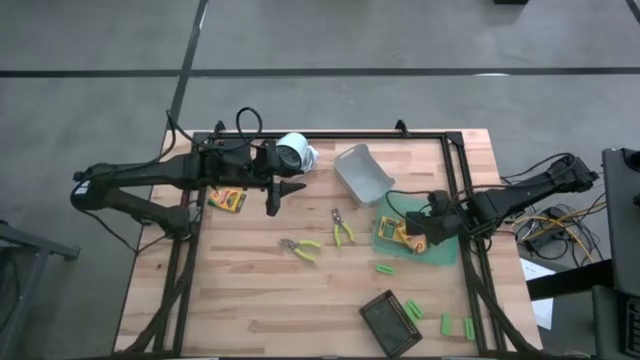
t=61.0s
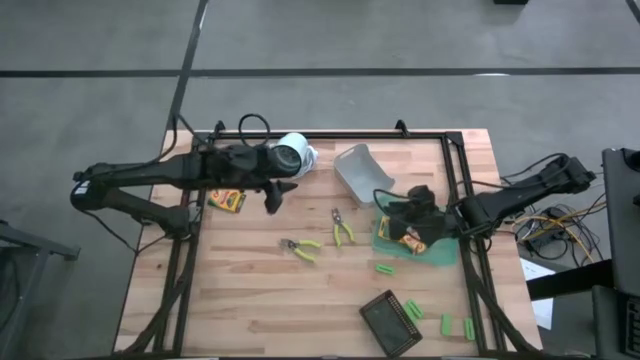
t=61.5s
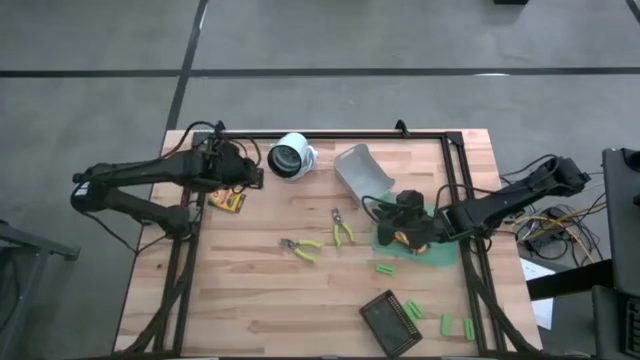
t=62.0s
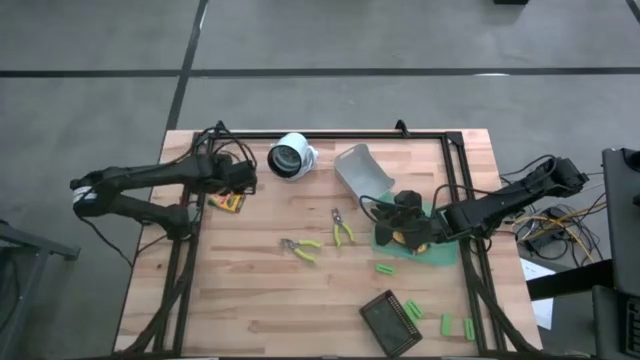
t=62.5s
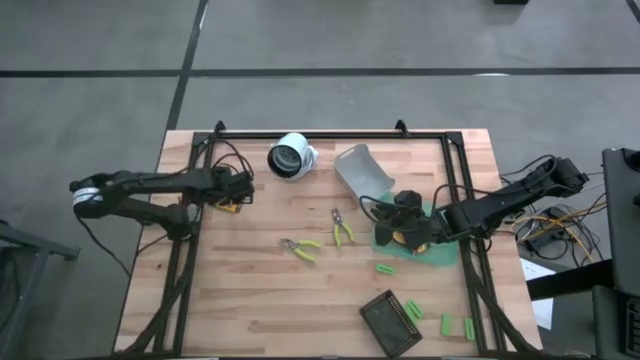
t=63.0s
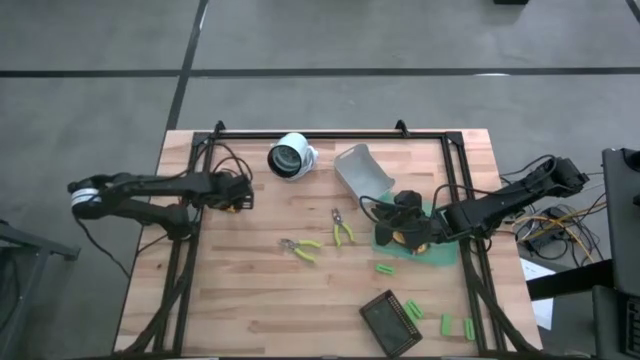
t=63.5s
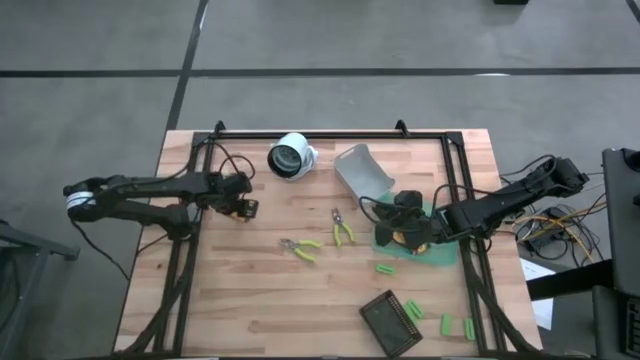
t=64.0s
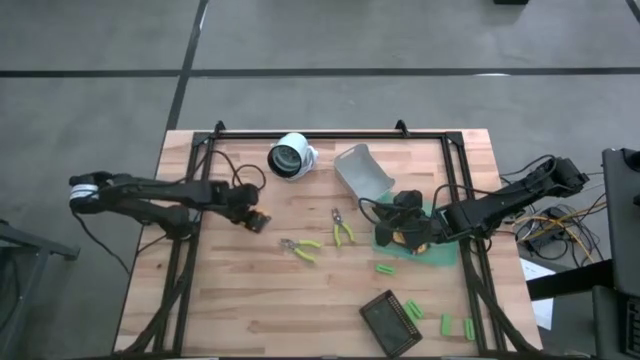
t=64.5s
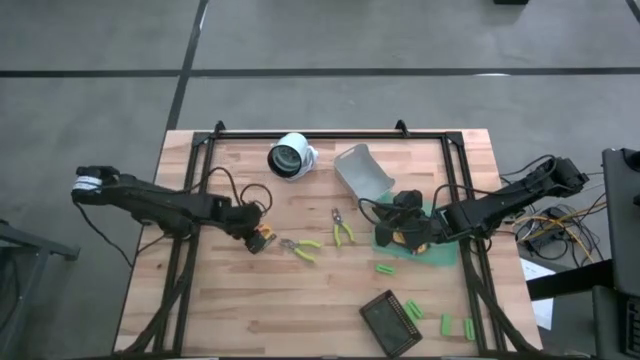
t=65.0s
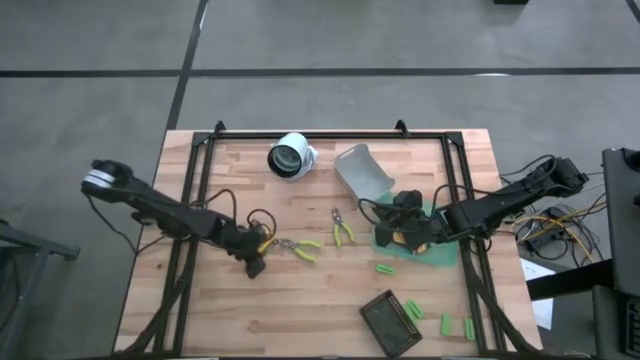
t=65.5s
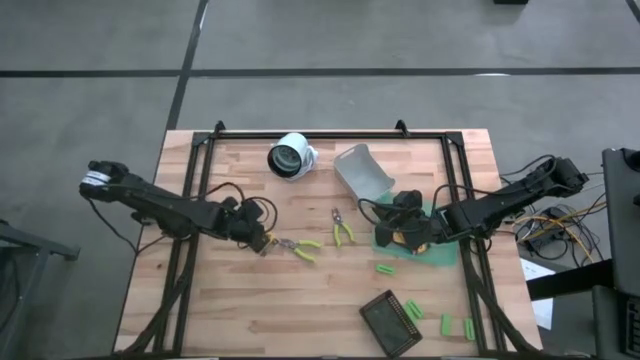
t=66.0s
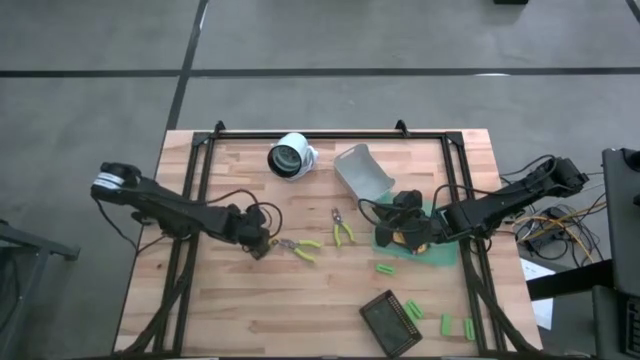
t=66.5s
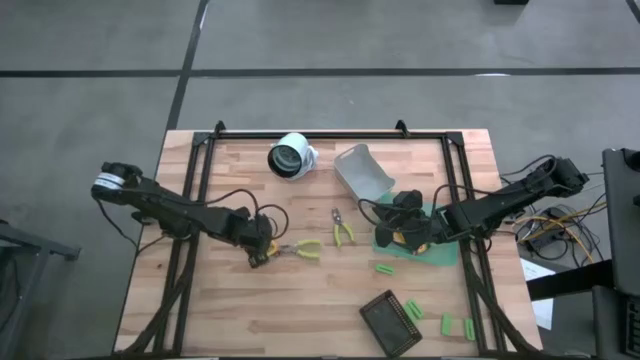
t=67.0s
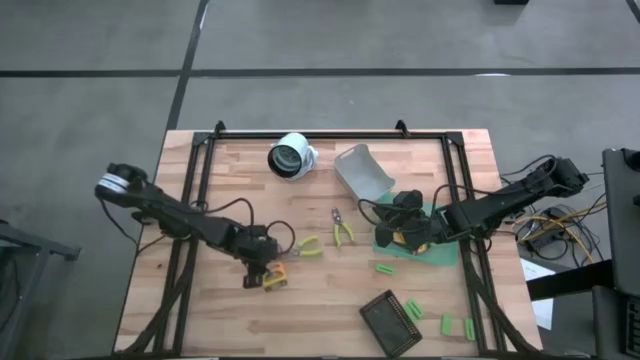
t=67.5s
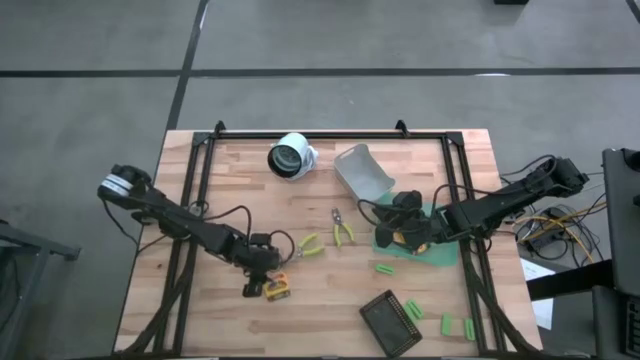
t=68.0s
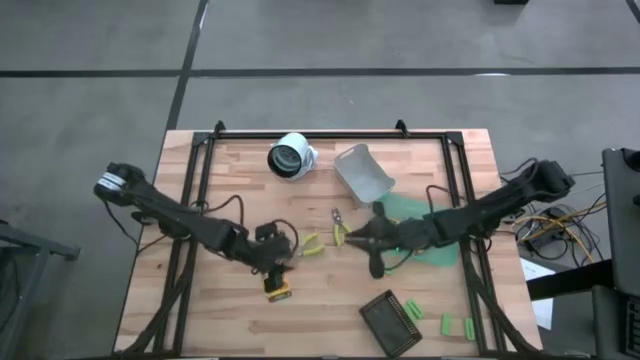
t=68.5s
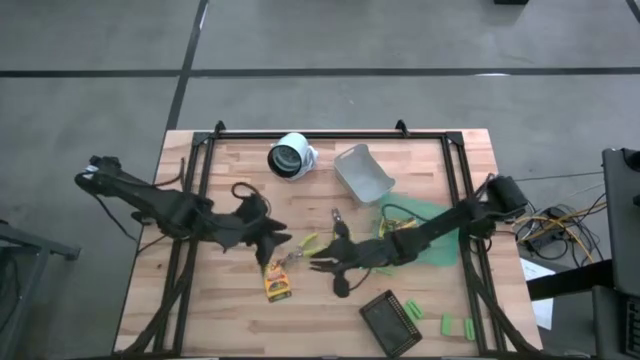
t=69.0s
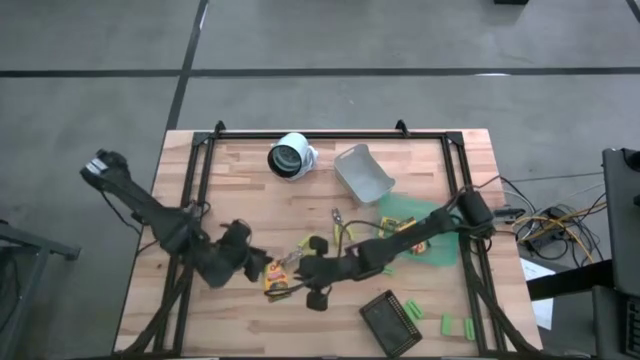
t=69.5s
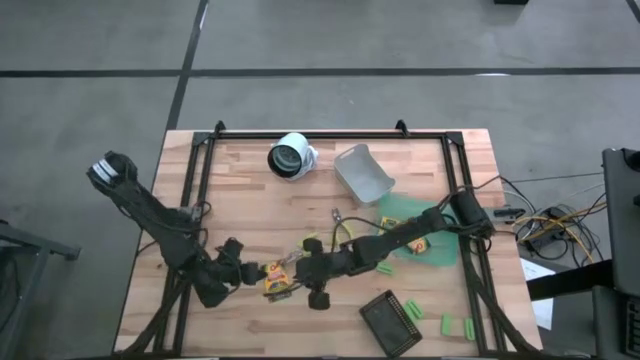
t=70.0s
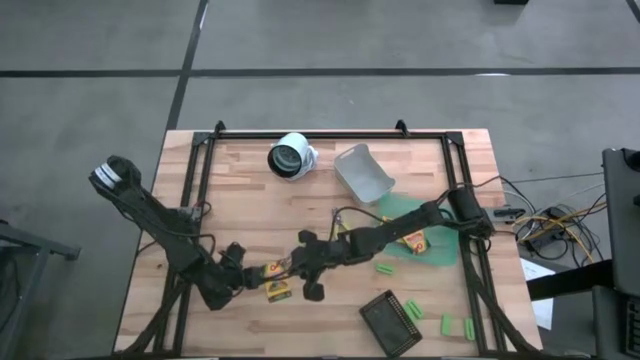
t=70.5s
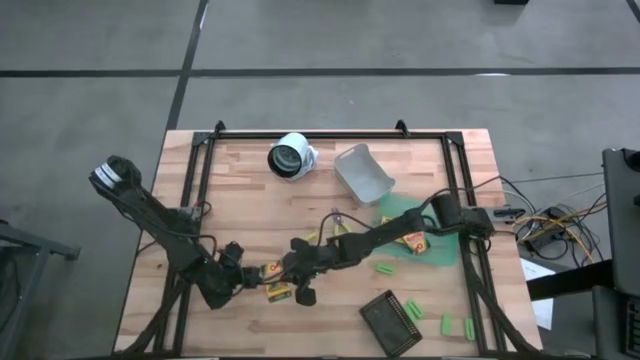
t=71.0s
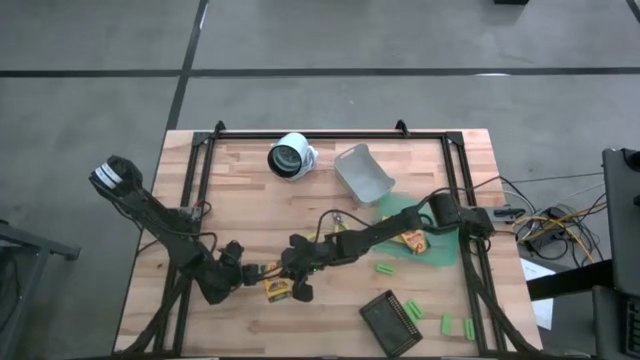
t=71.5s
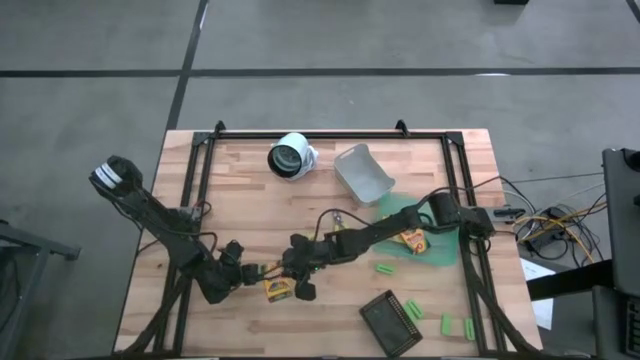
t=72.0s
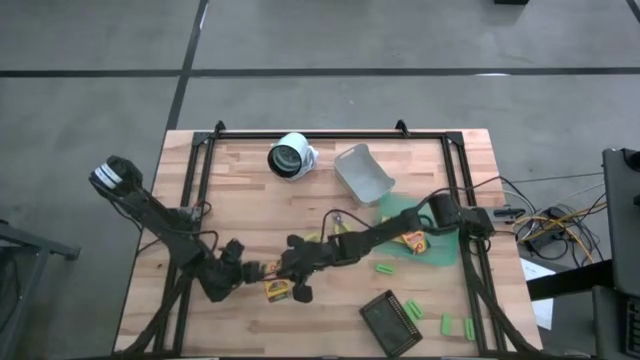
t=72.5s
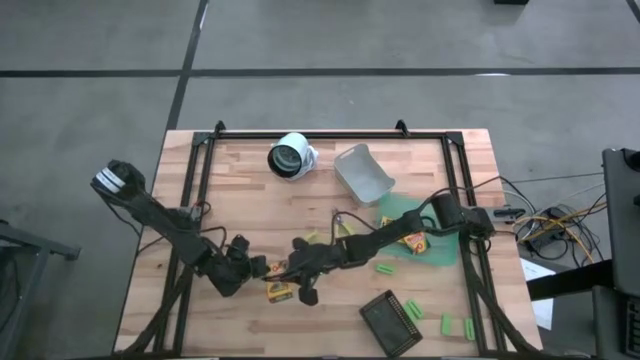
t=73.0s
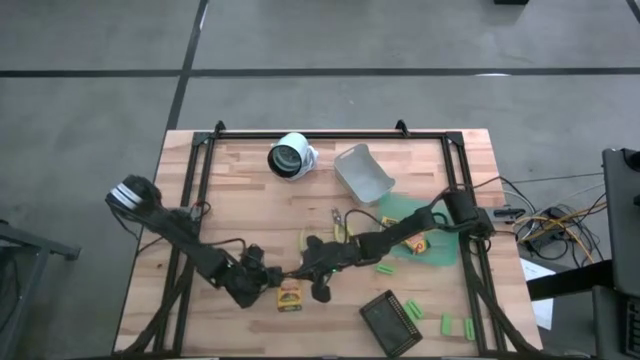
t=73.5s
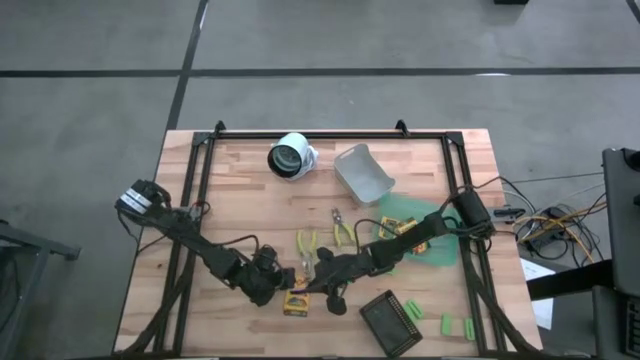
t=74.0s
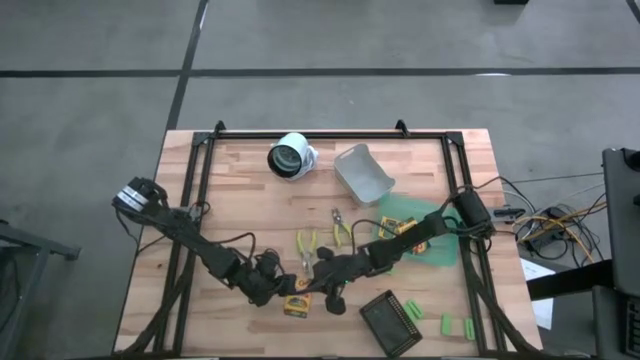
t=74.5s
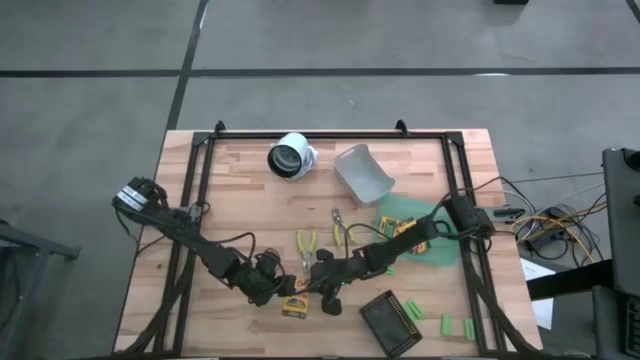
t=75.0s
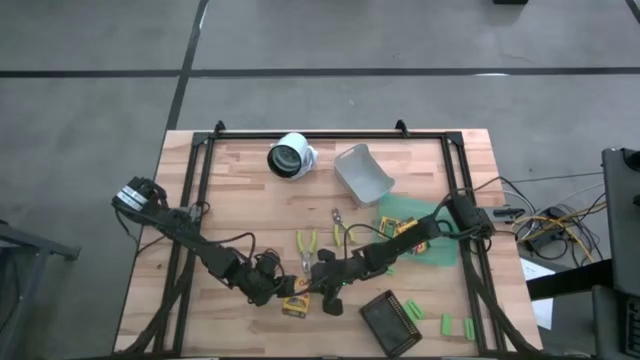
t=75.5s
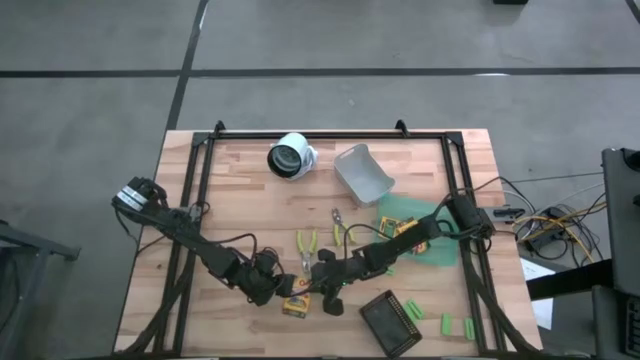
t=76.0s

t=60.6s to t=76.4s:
Task: Pick & Place School Supplies
Put the yellow crayon box into the green bin

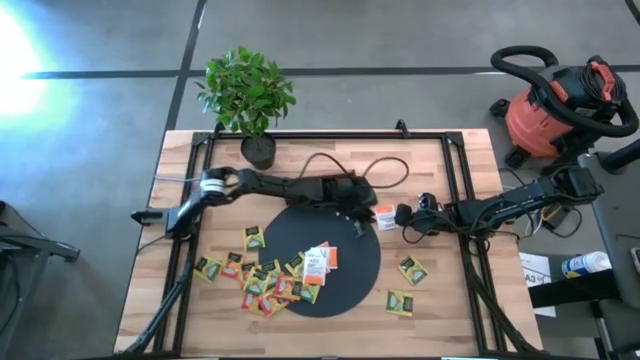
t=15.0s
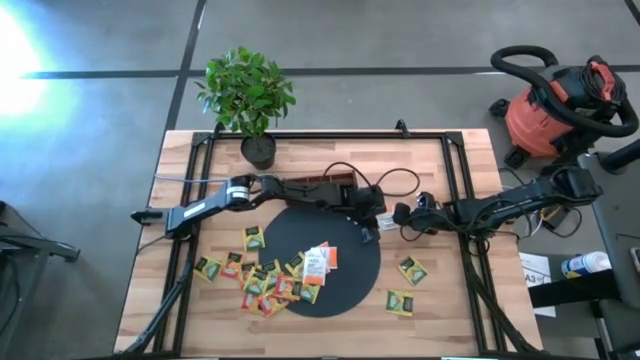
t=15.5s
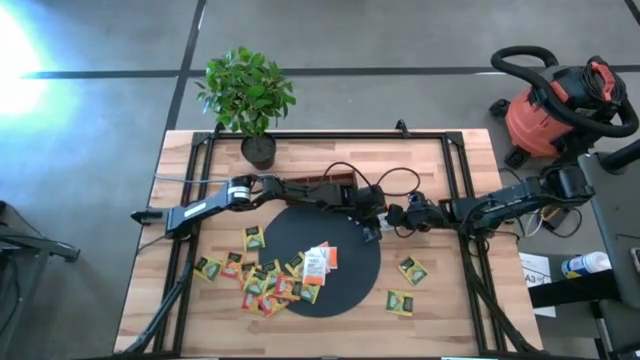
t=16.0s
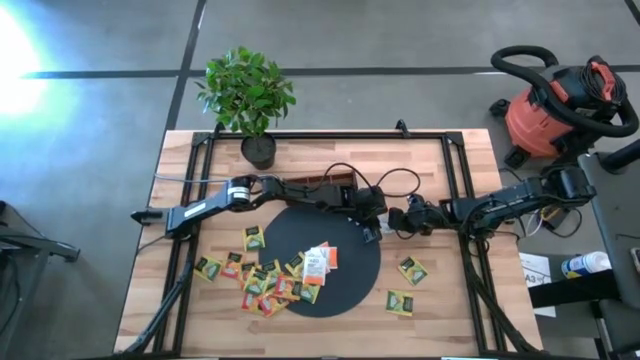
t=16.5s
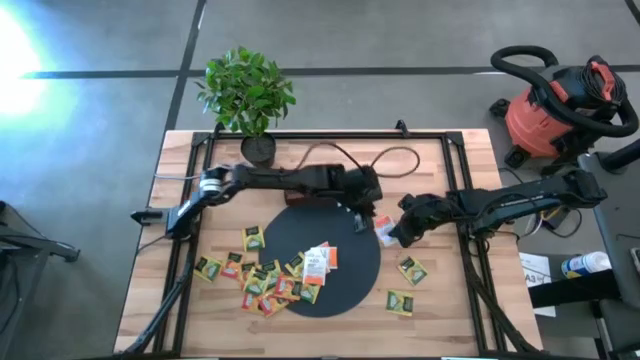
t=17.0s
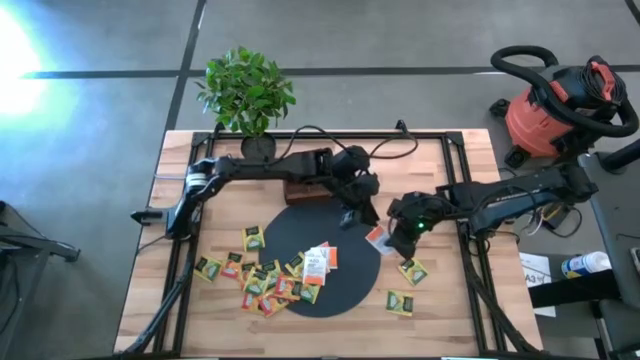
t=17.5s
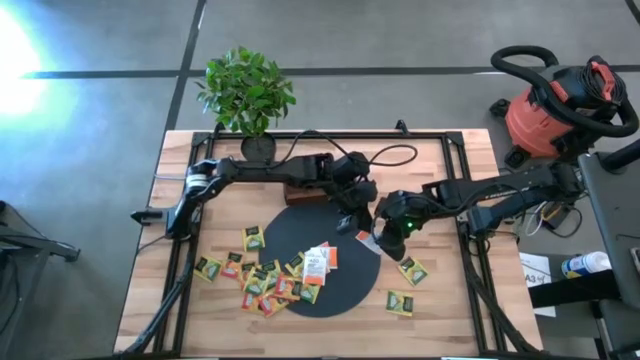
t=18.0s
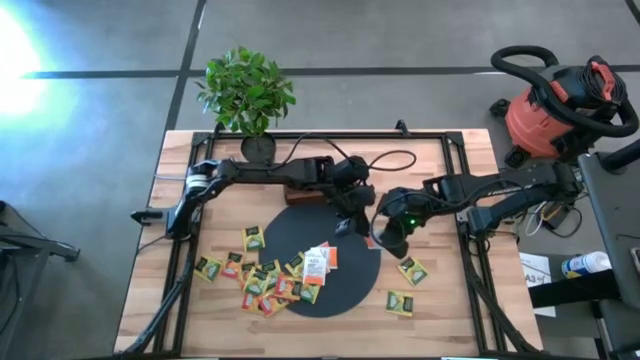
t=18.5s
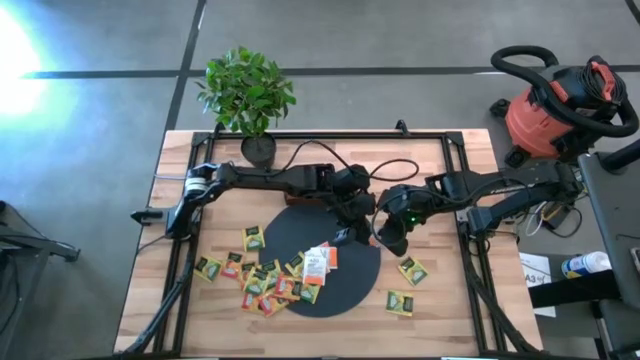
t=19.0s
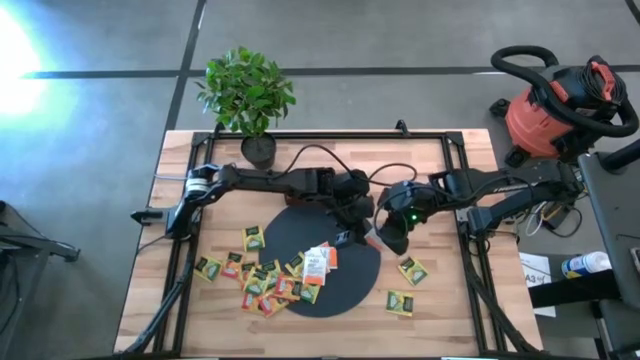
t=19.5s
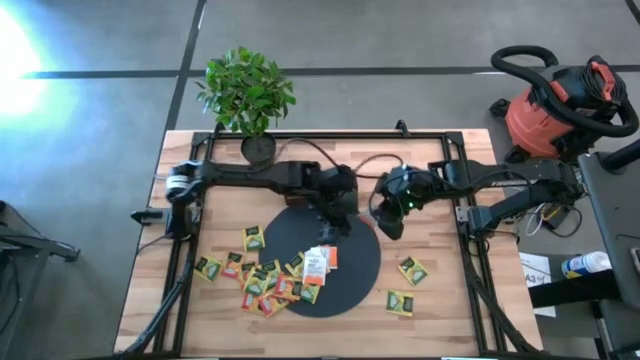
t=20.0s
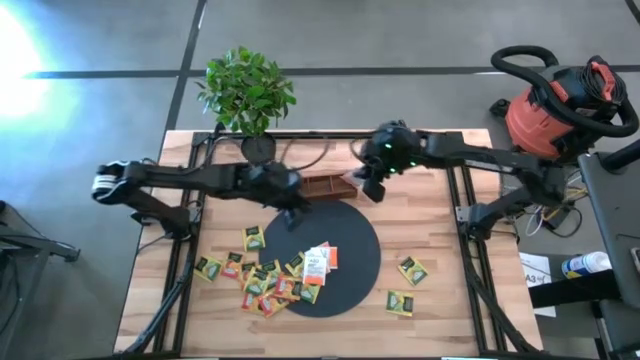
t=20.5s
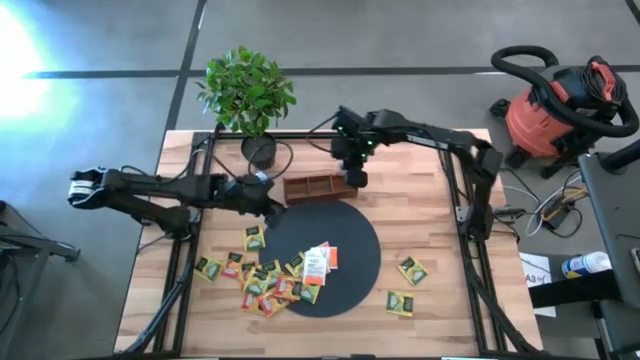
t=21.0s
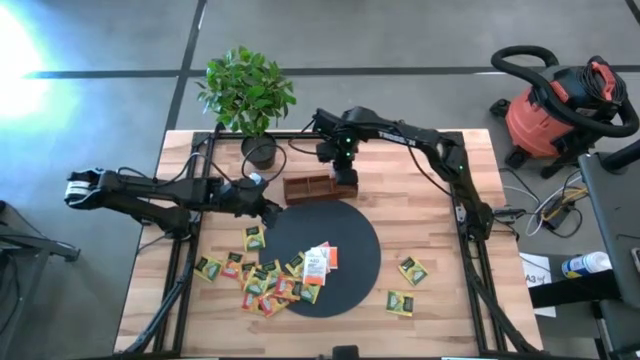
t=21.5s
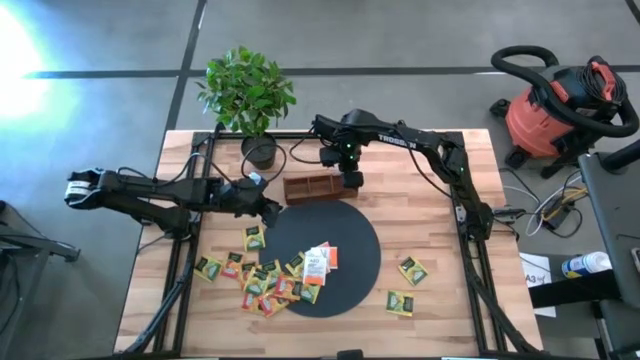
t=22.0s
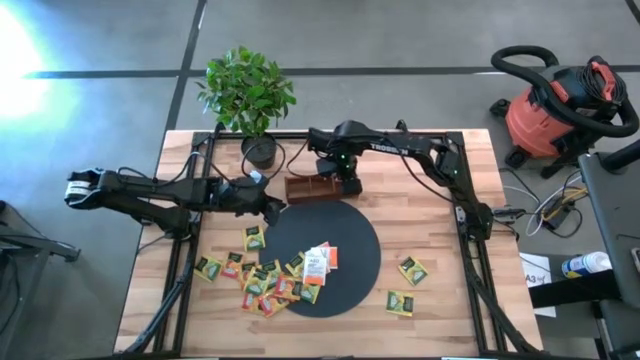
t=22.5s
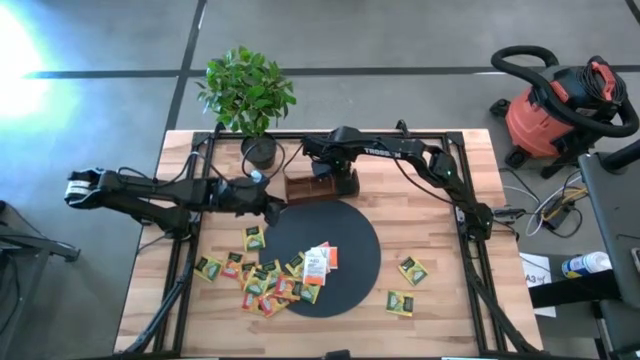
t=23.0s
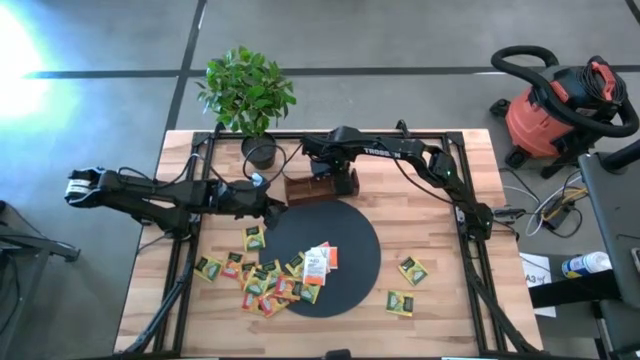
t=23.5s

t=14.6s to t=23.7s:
Task: Pick & Place Tea
Put the white tea bag into the right slot of the wooden organizer
